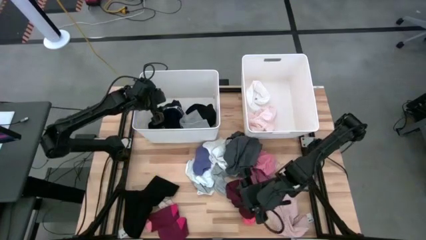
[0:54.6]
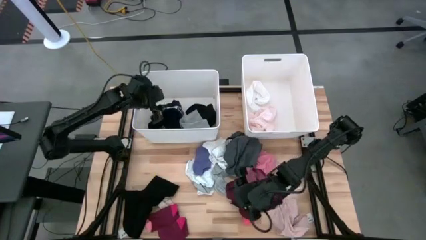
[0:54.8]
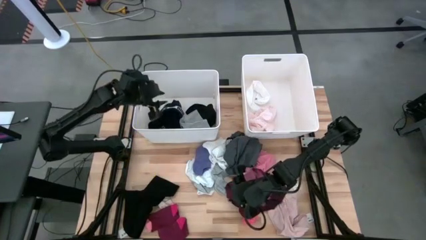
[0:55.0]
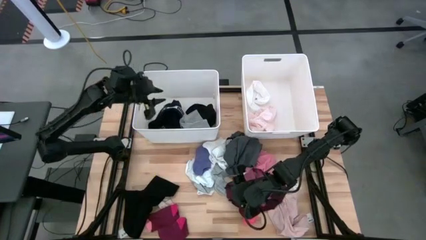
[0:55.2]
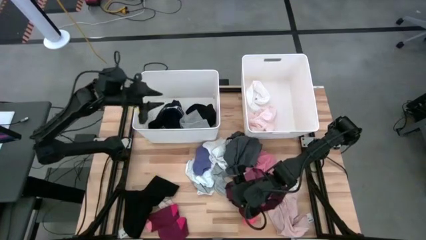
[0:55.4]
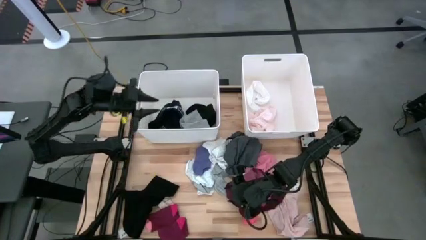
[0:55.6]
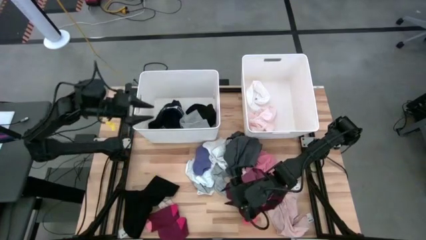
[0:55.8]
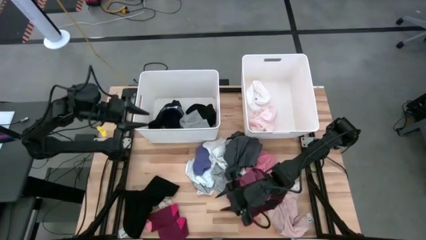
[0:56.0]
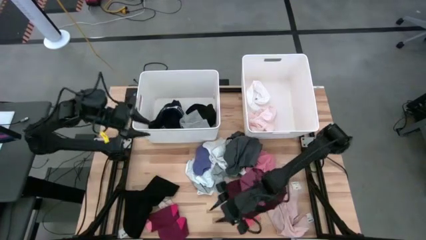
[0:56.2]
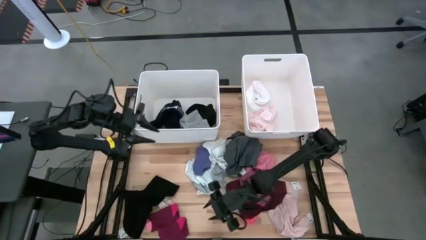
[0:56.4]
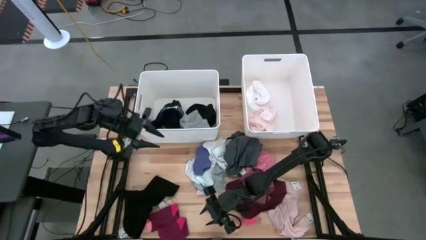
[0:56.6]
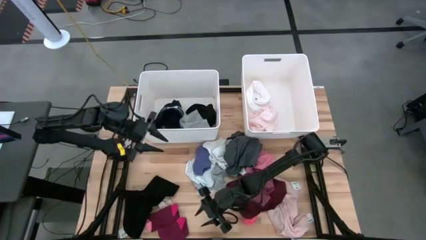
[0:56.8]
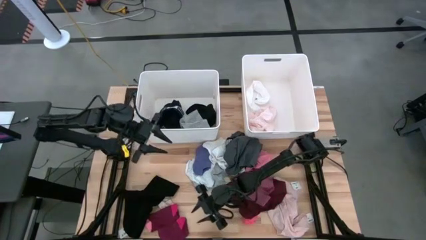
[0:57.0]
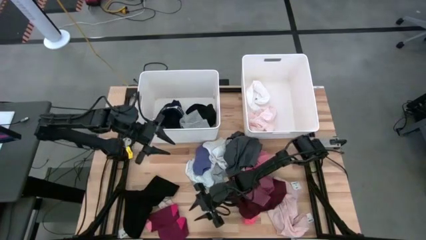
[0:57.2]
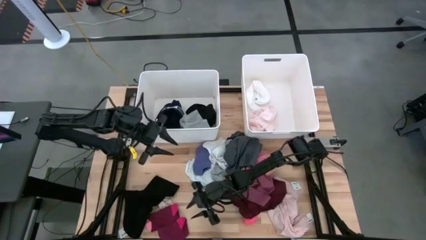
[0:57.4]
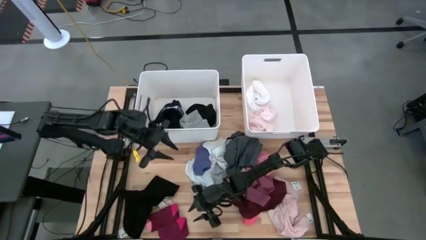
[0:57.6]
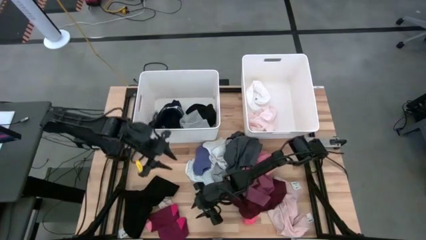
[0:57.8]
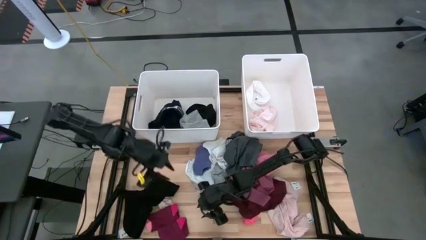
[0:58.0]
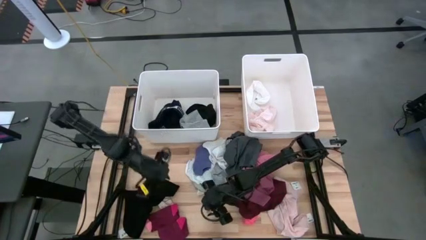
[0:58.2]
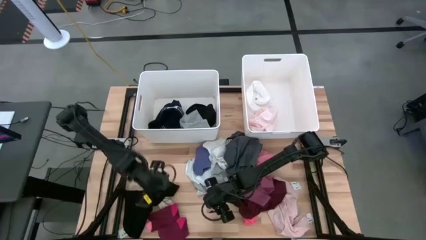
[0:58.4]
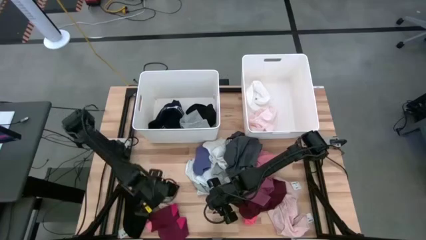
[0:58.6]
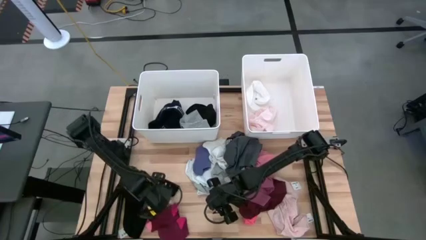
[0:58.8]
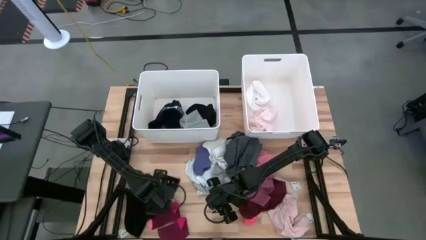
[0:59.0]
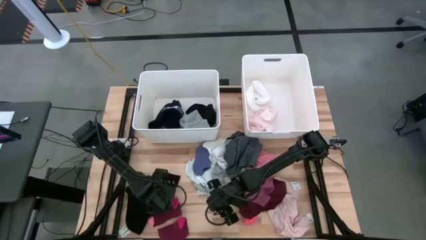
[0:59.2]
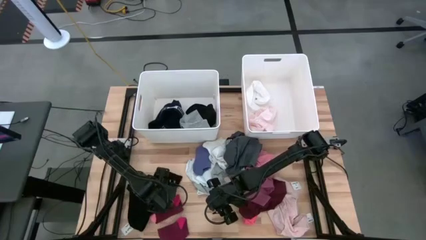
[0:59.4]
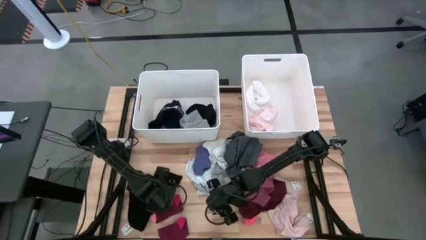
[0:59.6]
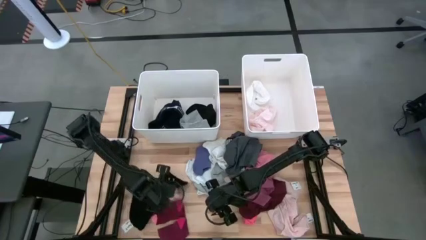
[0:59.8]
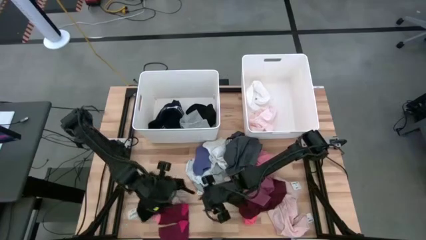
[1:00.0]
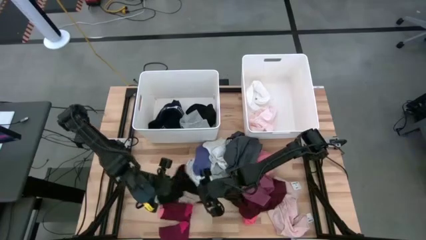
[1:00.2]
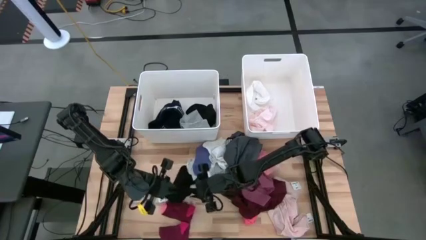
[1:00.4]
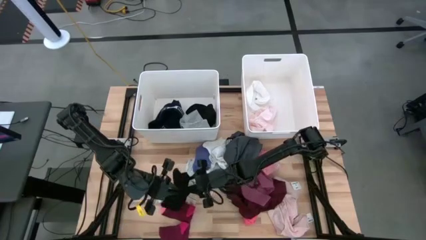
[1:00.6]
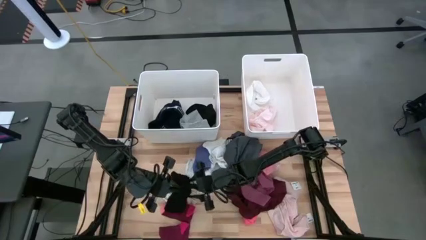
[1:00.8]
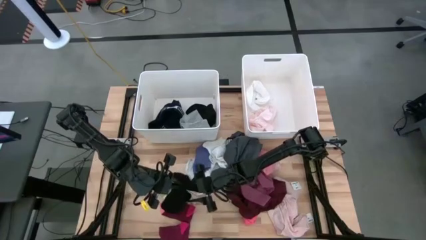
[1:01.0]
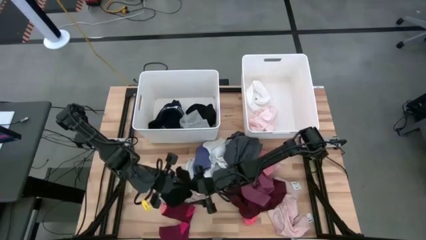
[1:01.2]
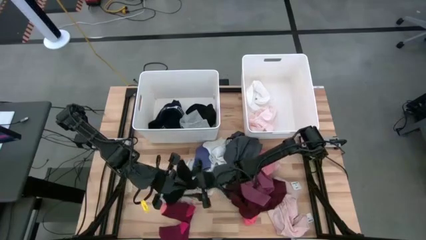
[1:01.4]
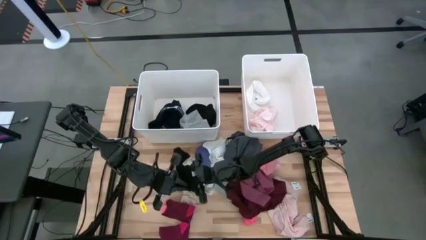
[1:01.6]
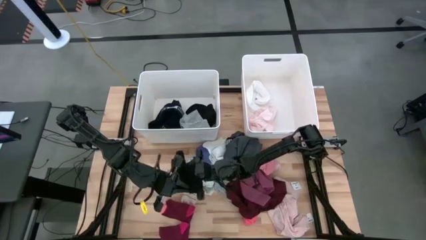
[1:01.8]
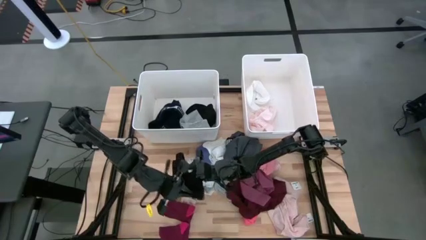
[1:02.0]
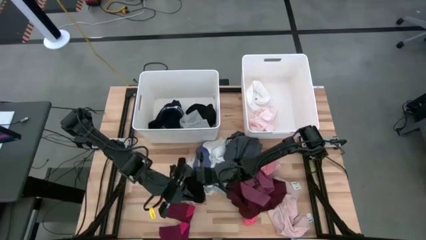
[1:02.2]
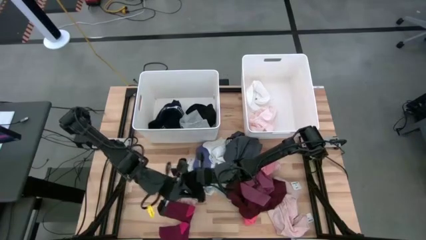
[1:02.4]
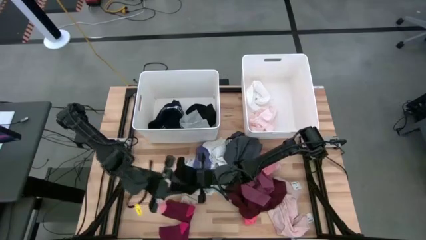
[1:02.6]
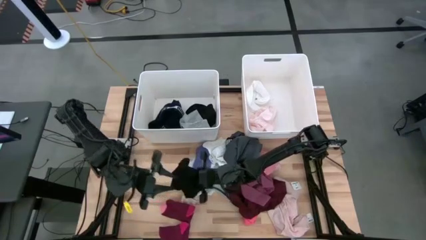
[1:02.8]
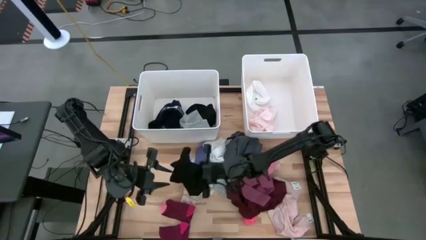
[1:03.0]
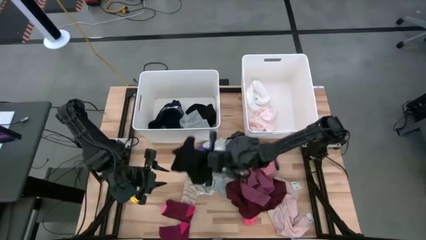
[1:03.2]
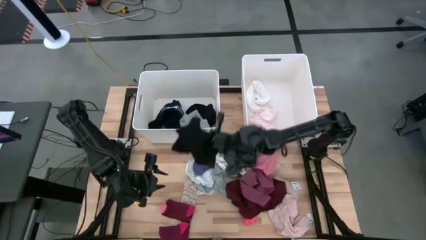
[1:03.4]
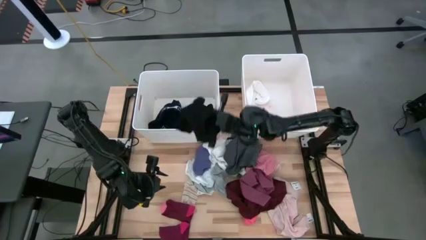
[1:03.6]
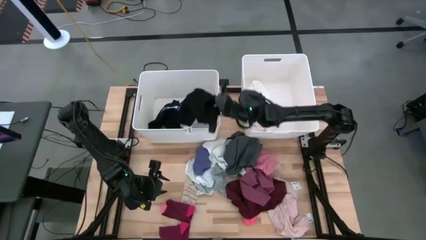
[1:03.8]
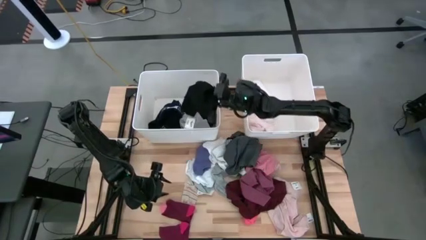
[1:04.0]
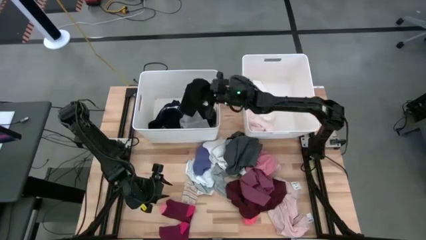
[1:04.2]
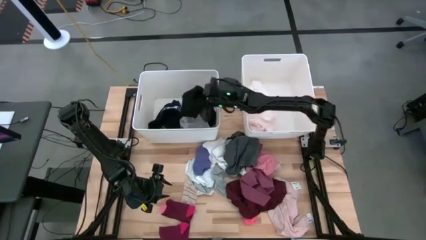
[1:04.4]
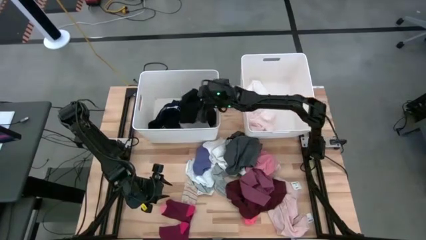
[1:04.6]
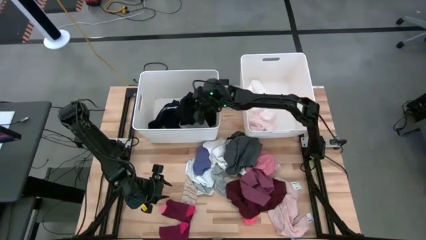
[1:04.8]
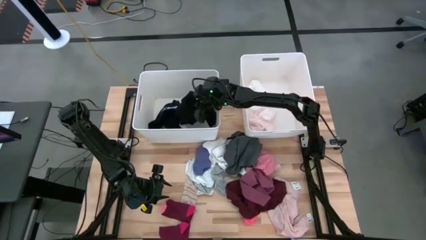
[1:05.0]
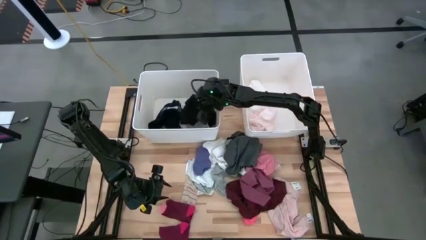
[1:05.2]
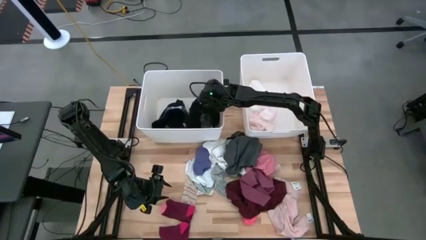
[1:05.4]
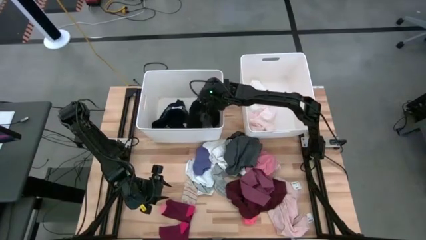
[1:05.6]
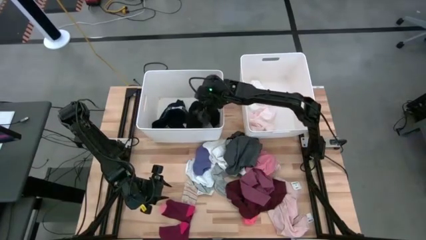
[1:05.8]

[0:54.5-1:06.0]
Task: Sort clothes
Put the black garment into the left white laundry organizer

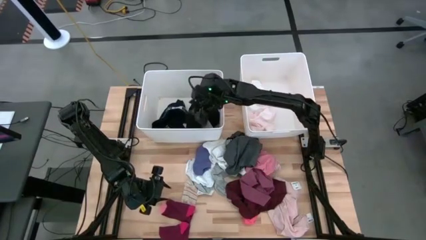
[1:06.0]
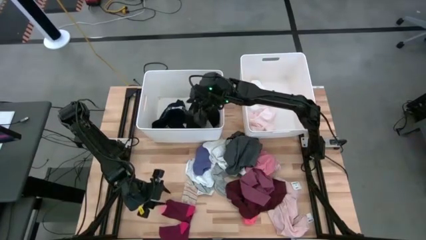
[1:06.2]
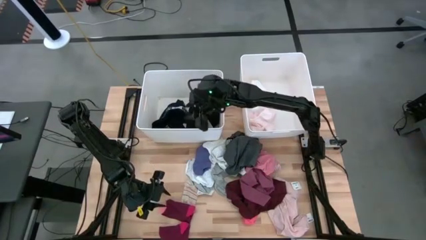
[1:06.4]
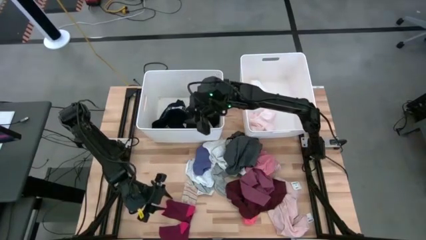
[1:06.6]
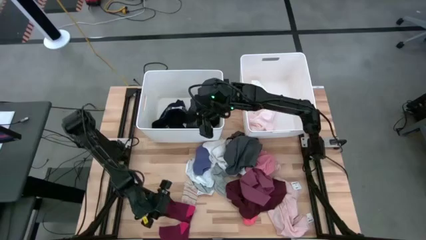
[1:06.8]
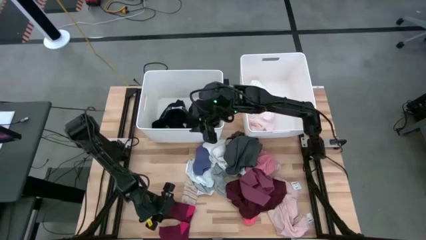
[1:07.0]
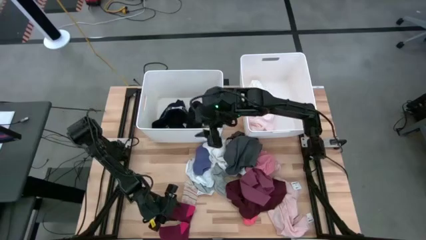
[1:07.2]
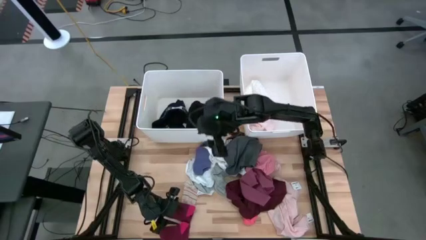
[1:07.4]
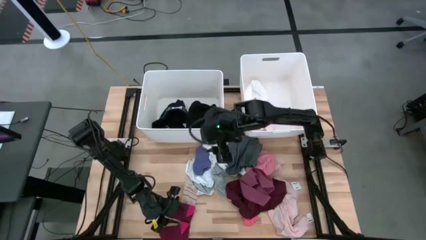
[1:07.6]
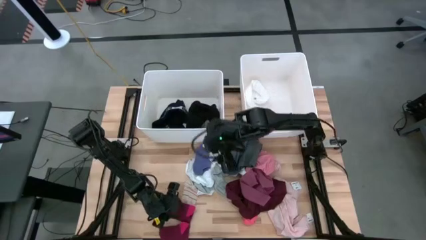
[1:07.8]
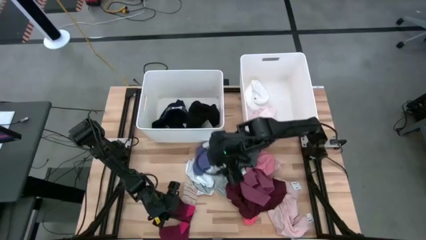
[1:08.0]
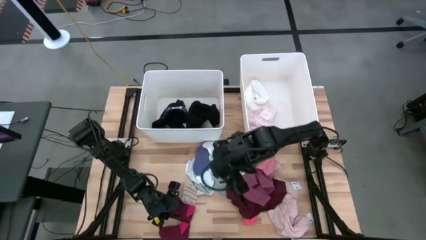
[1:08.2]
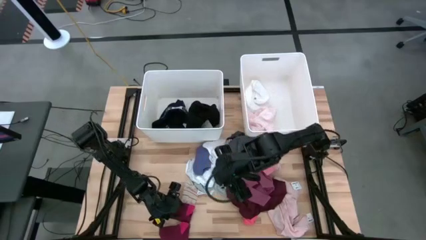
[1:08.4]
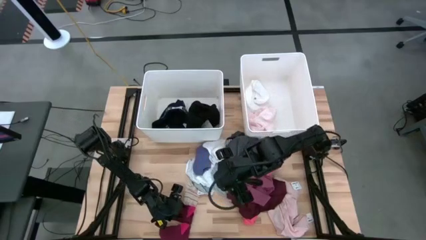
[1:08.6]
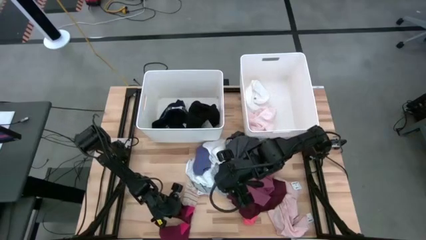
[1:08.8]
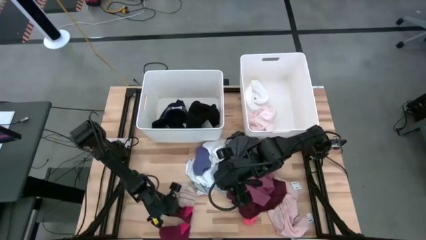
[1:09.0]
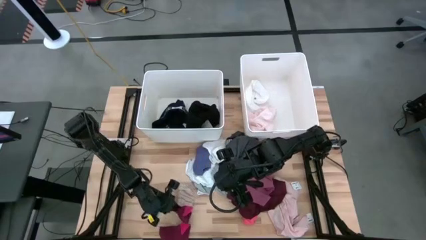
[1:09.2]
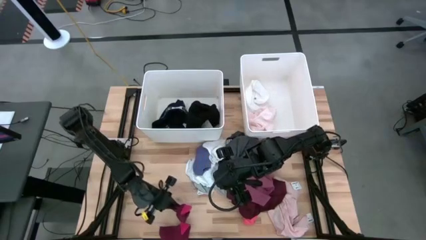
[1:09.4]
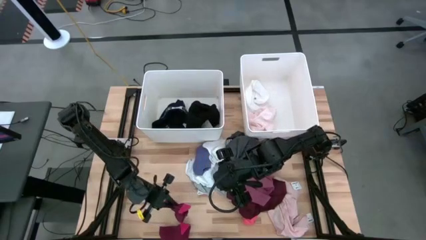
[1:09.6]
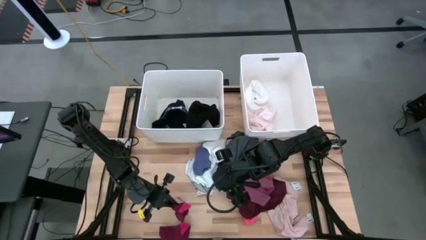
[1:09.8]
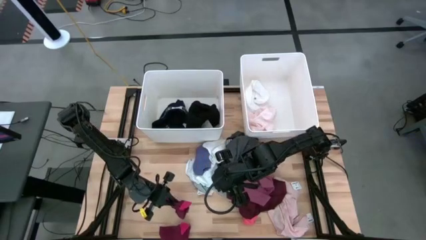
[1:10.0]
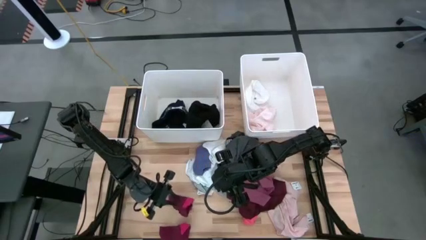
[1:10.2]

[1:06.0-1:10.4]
Put the red sock into the right white laundry organizer
